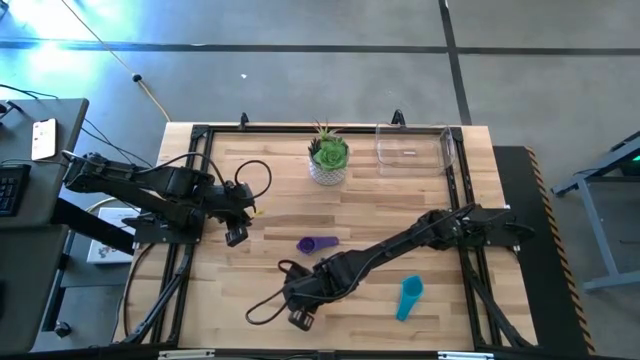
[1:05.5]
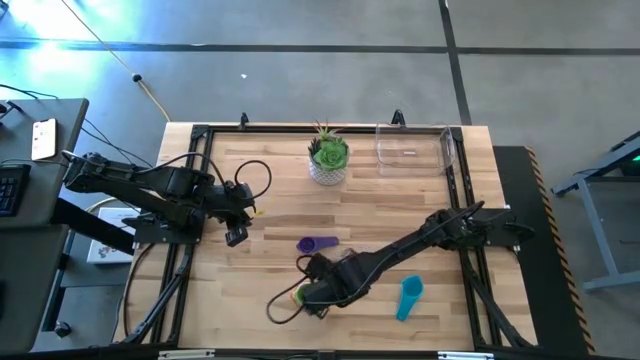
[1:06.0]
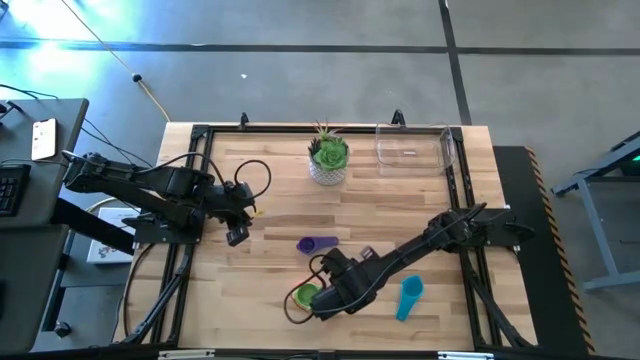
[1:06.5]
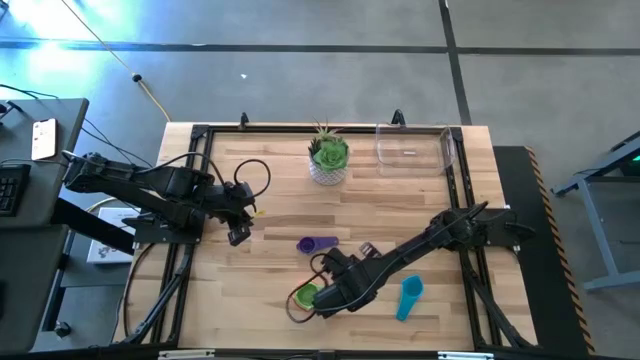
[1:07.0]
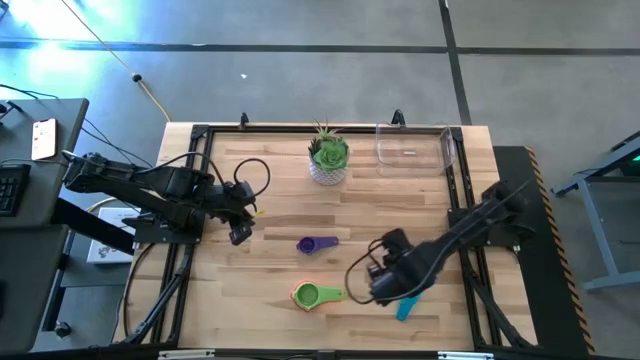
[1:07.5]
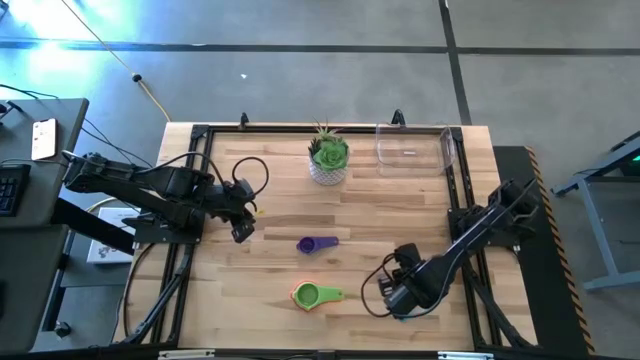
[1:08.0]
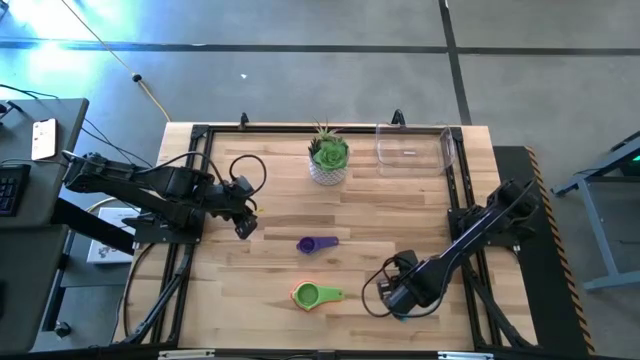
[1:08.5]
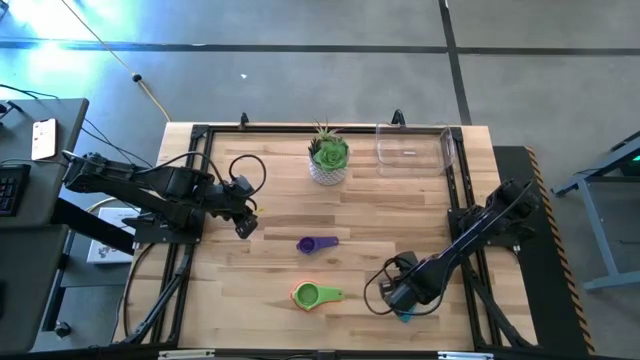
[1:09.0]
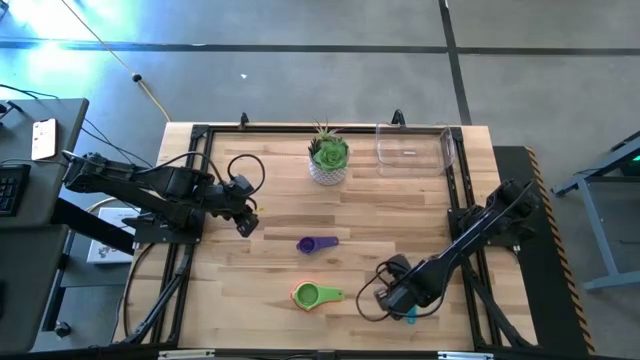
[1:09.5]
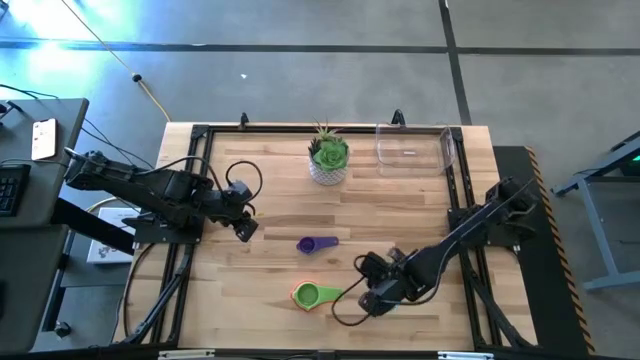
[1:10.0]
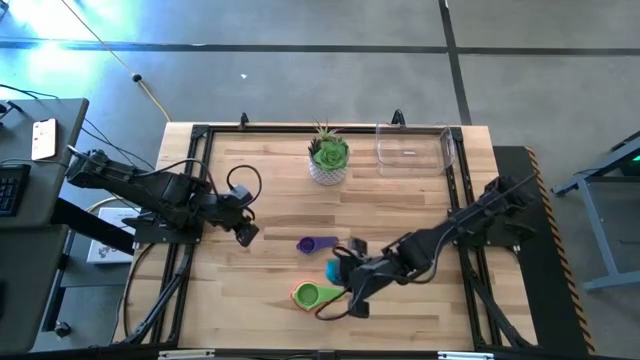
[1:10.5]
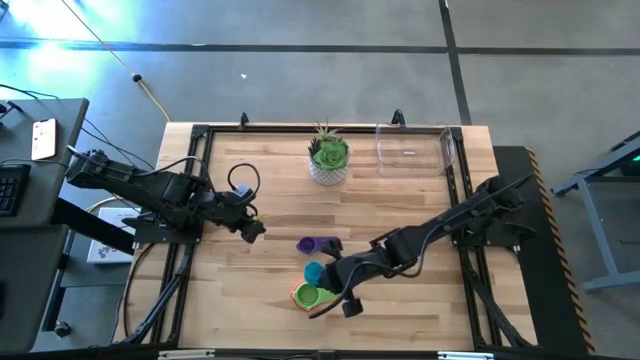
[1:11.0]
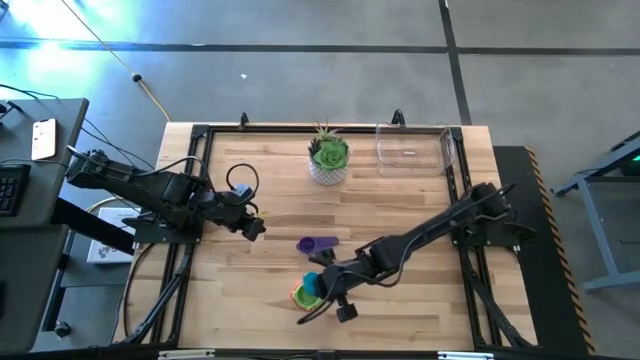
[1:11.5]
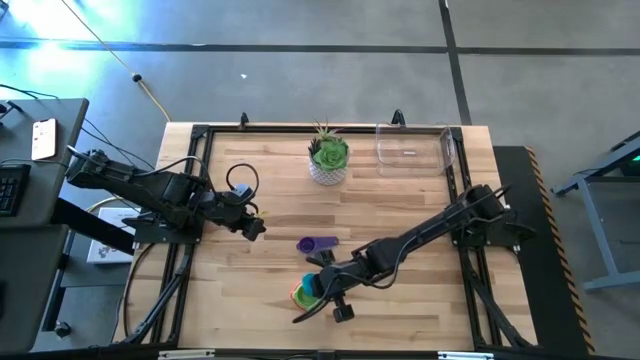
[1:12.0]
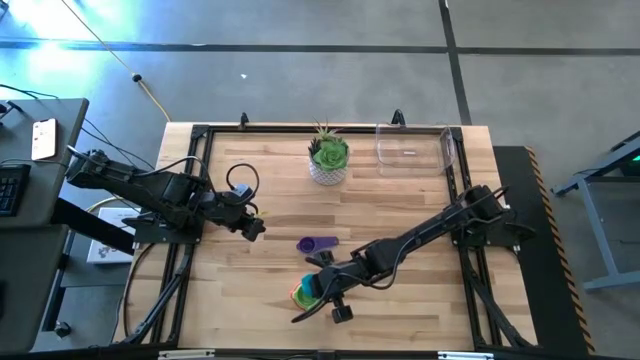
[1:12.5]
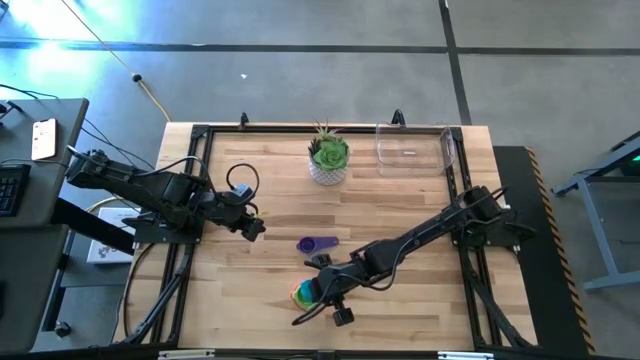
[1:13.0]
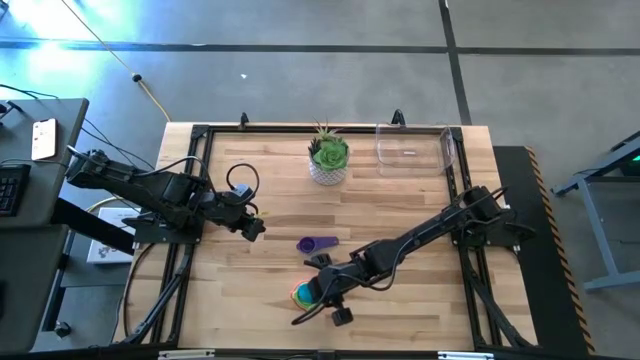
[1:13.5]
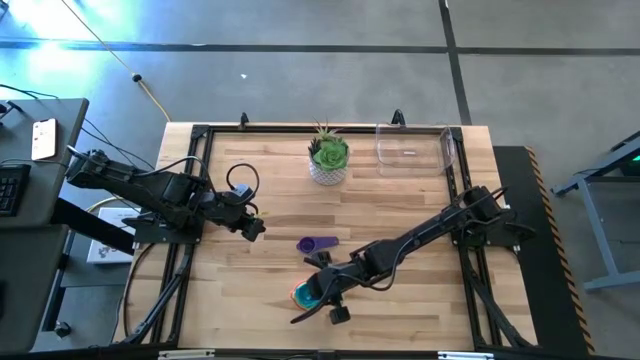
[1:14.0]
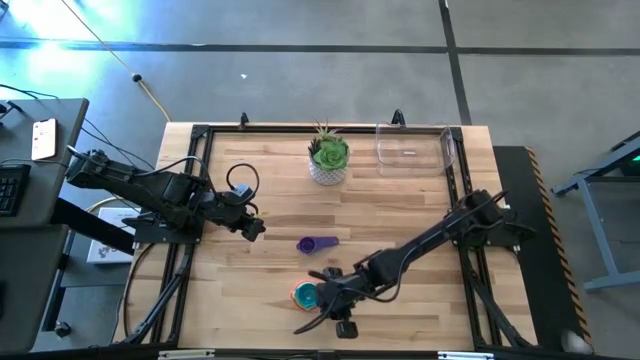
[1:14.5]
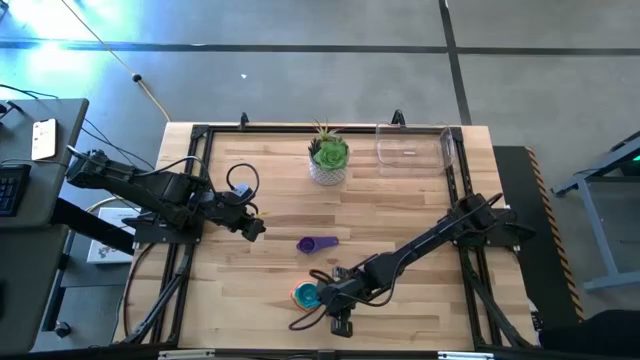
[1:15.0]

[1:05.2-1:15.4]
Task: Nest measuring cups in basket
Stack the light blue measuring cup on top of the green measuring cup

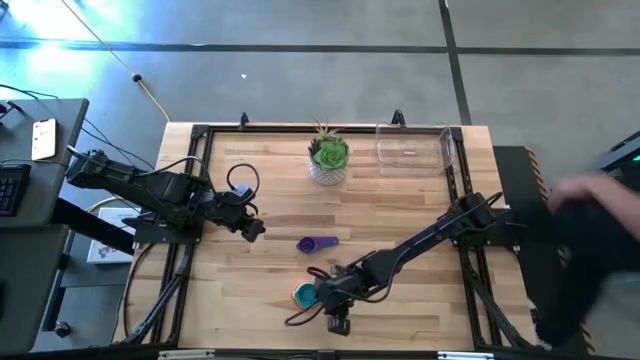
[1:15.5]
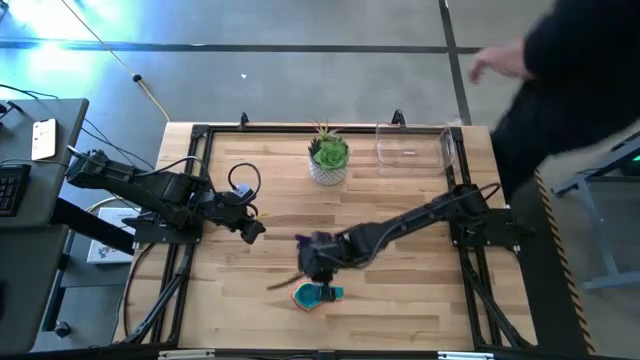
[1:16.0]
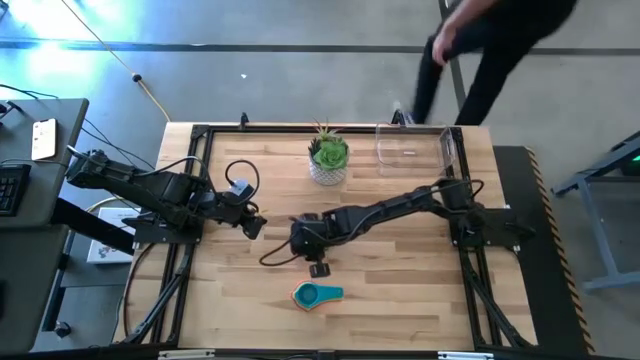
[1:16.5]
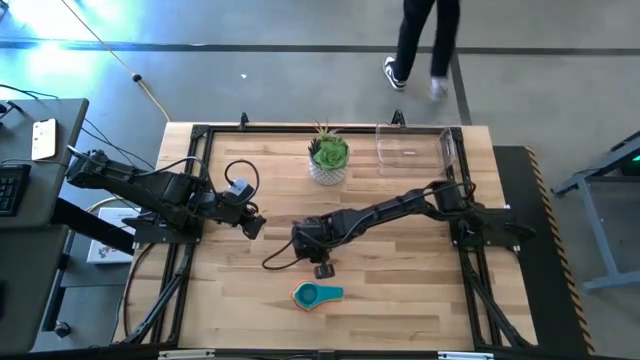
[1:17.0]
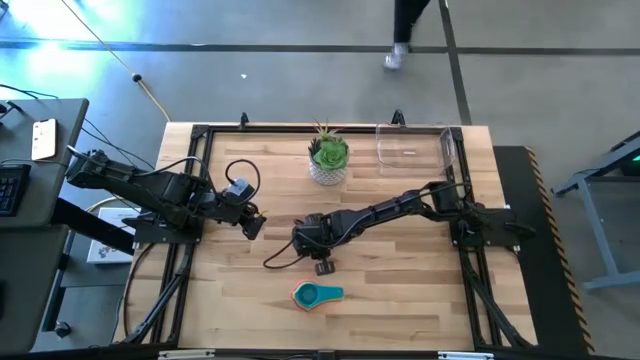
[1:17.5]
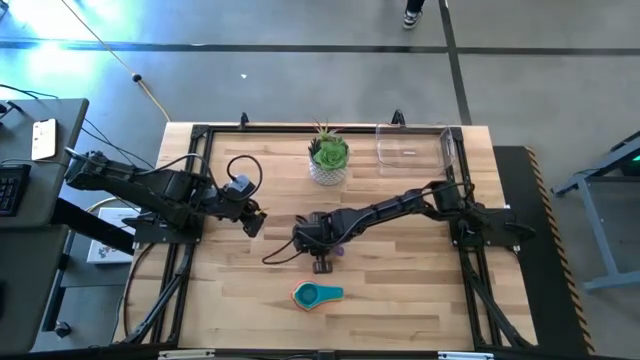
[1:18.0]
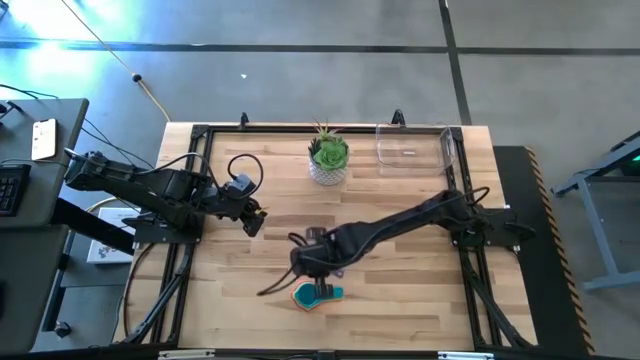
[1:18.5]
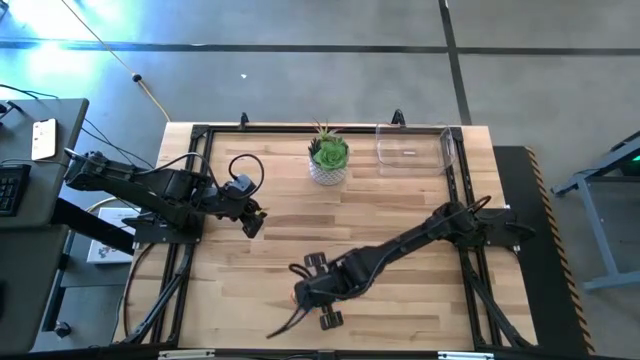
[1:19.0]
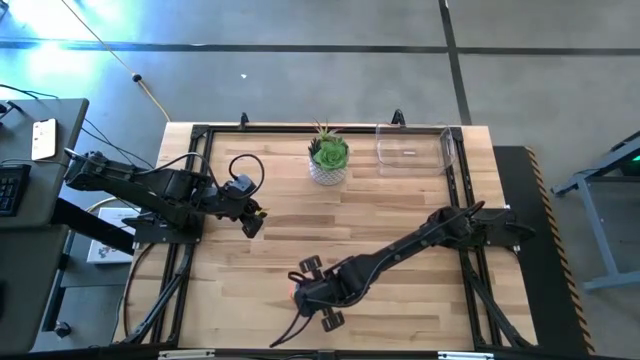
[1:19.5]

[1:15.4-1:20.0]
Stack the violet measuring cup on top of the light blue measuring cup

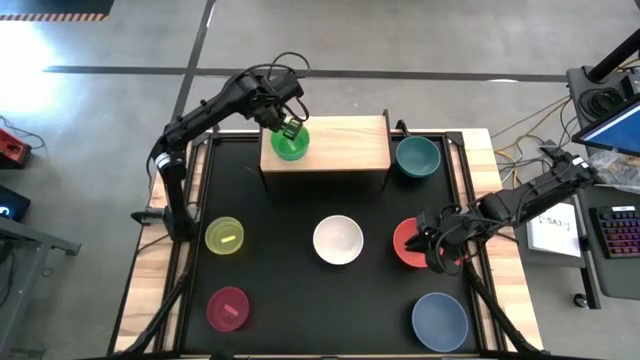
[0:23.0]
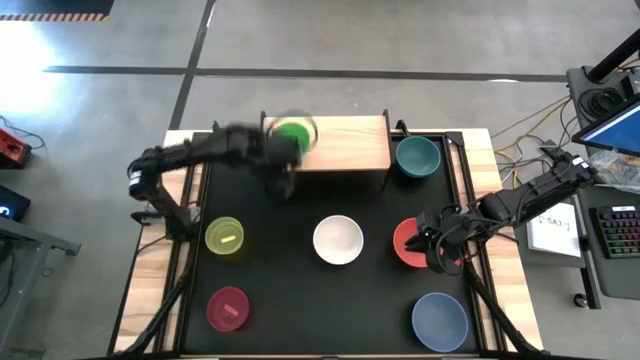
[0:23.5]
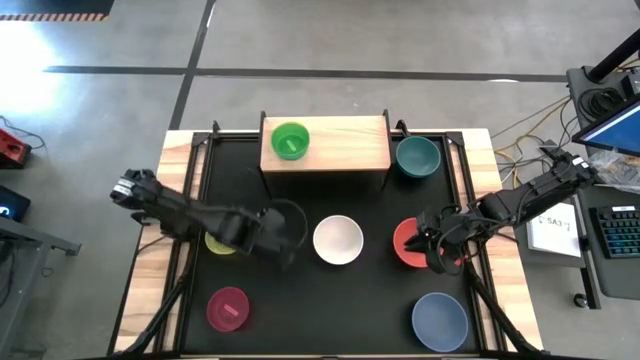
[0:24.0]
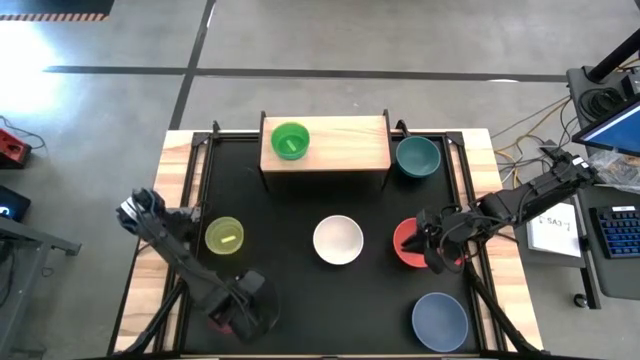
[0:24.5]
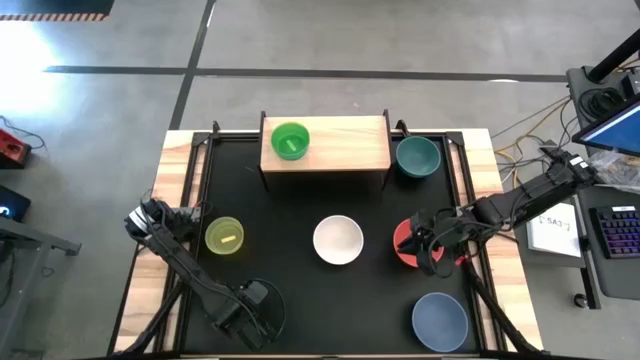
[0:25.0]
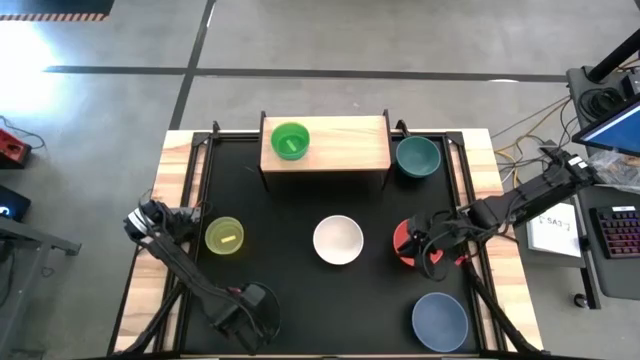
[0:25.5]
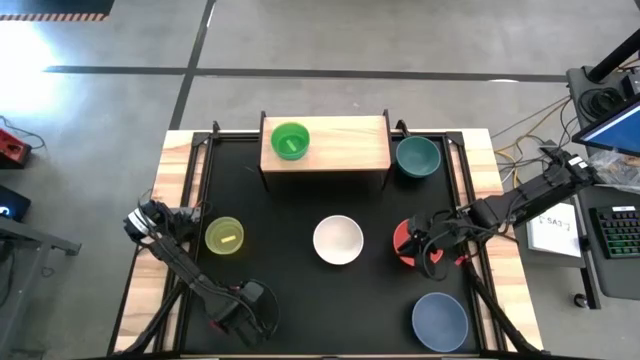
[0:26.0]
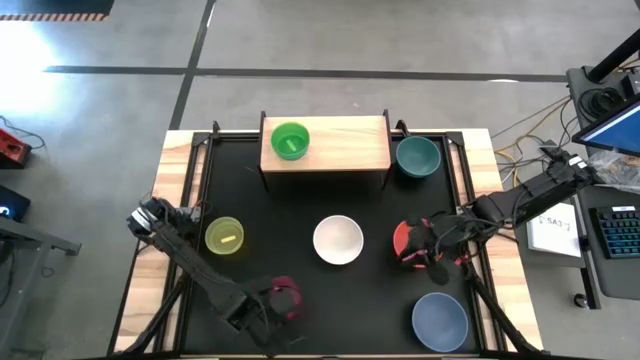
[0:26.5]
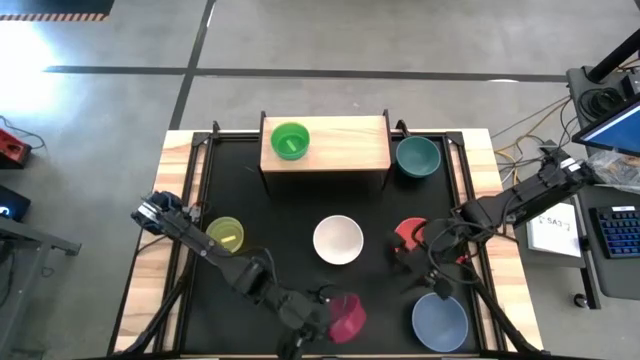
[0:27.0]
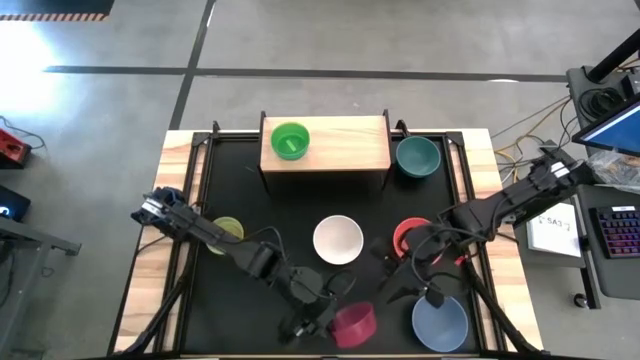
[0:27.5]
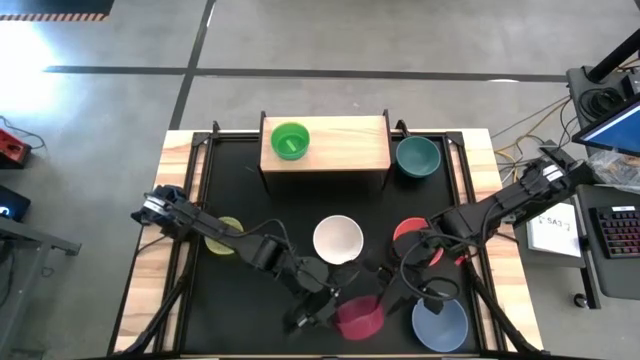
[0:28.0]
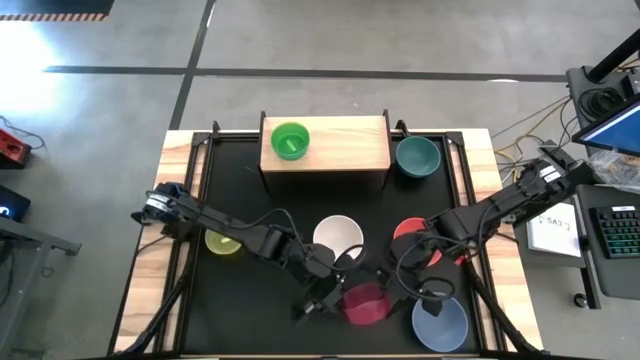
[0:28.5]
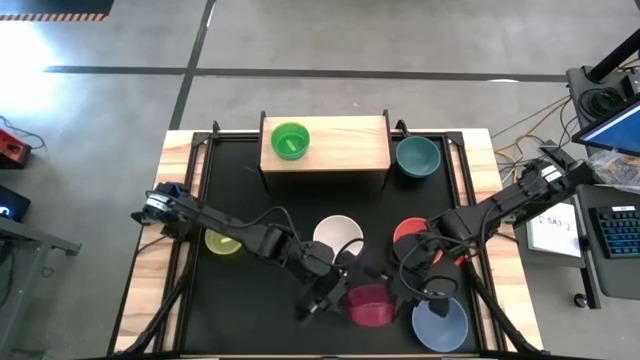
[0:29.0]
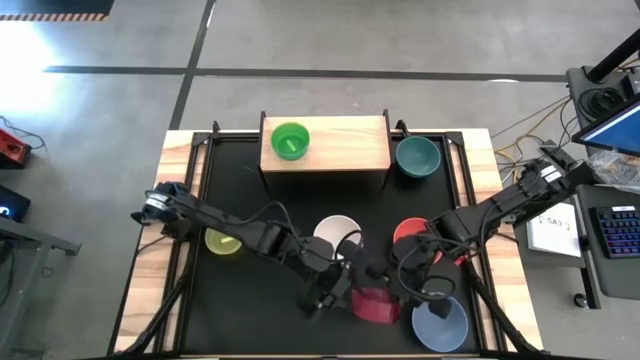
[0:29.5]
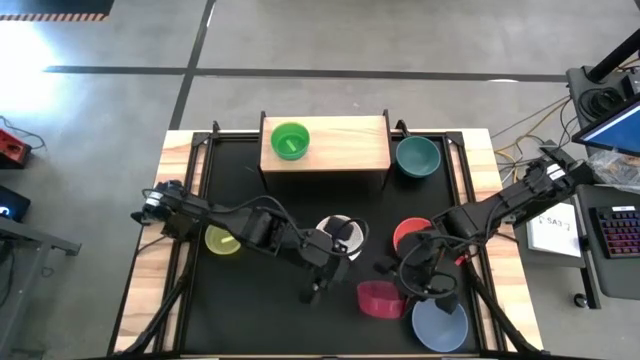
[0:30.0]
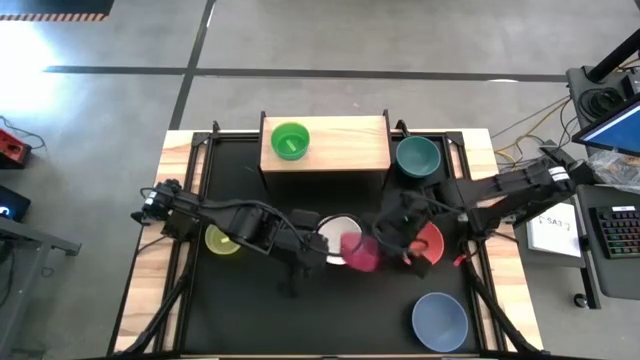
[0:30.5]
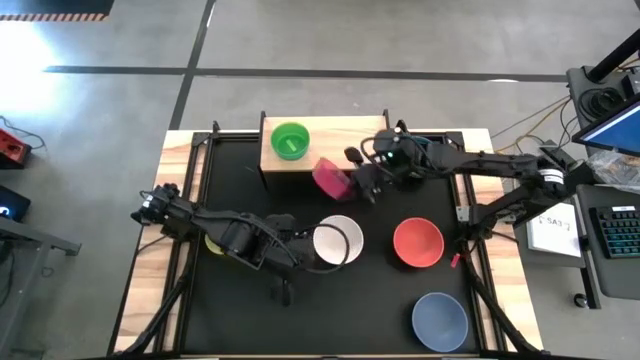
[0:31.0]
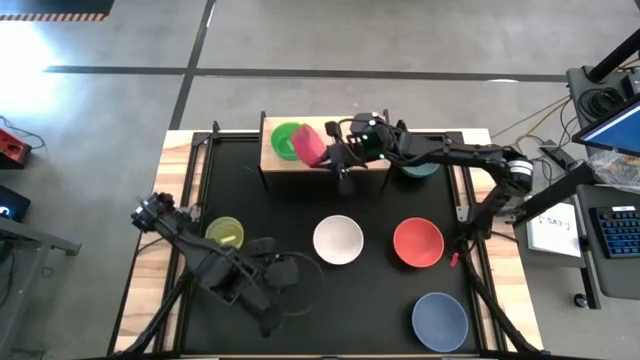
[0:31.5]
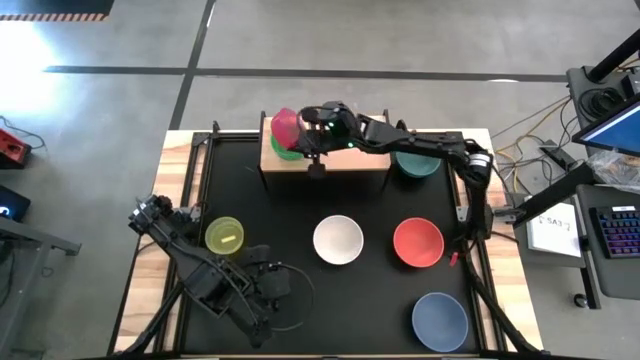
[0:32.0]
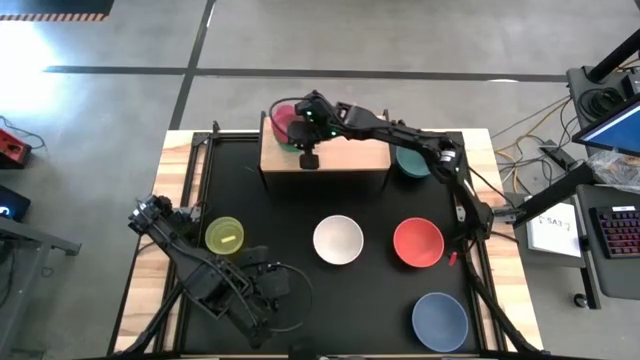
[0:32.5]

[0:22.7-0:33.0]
Task: Place and stack bowls onto a shelf
Stack the small pink bowl on top of the small green bowl on the shelf
